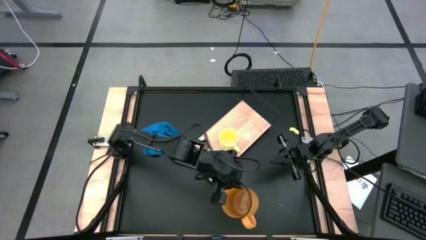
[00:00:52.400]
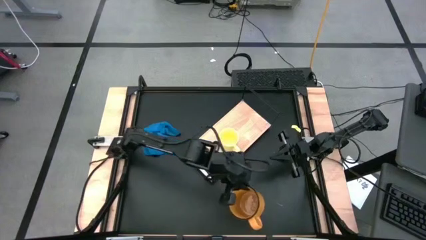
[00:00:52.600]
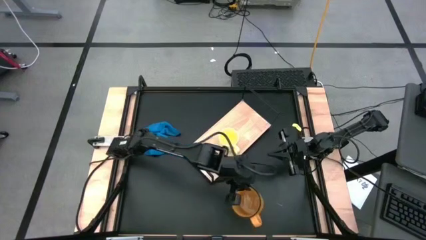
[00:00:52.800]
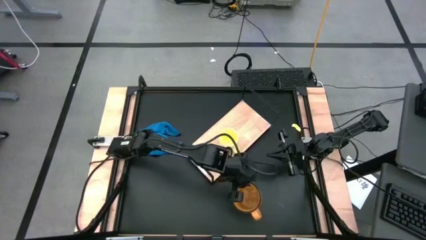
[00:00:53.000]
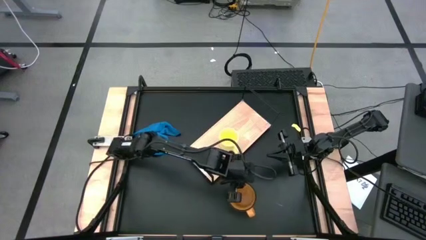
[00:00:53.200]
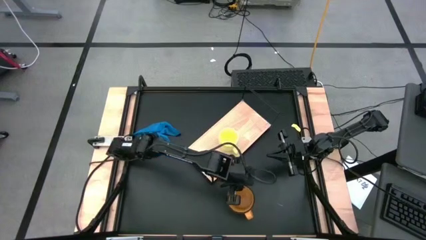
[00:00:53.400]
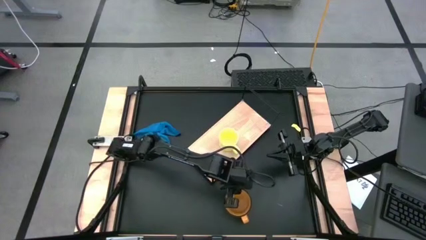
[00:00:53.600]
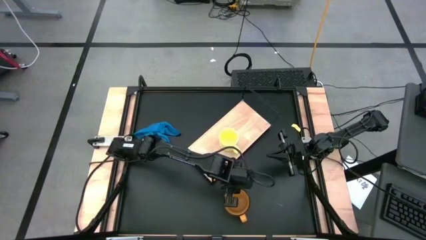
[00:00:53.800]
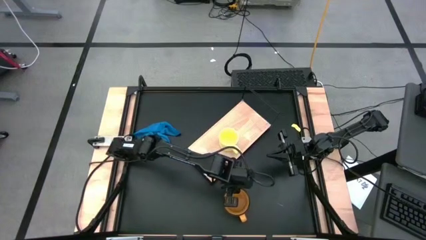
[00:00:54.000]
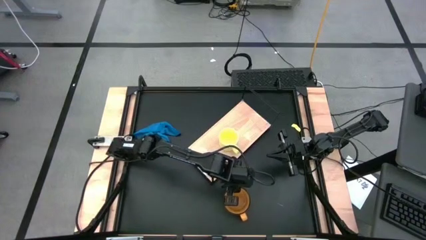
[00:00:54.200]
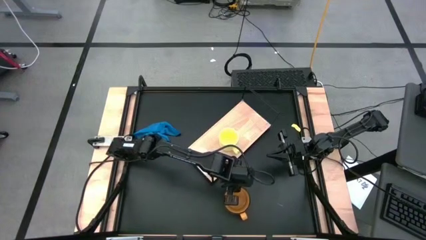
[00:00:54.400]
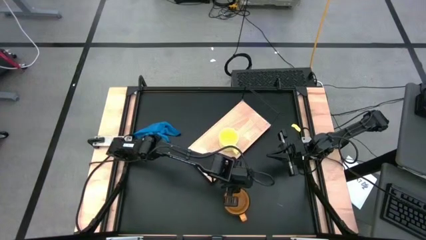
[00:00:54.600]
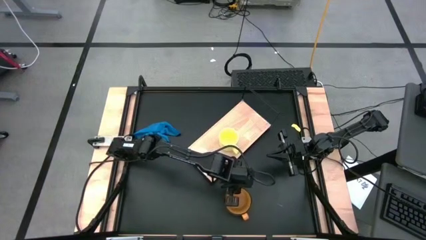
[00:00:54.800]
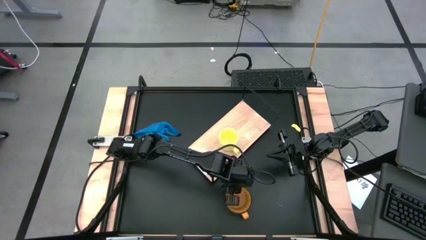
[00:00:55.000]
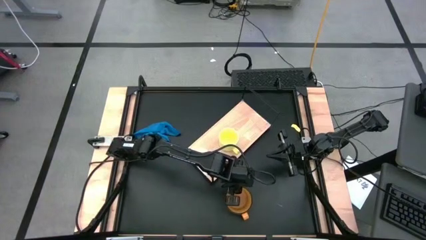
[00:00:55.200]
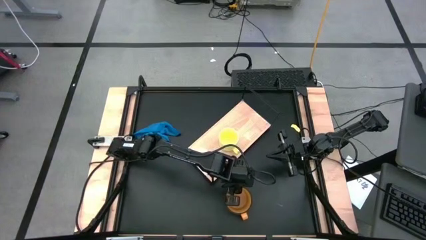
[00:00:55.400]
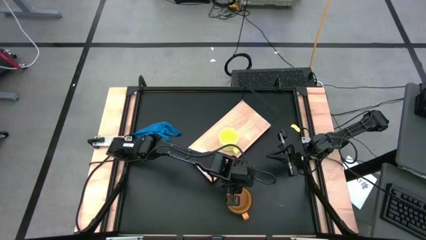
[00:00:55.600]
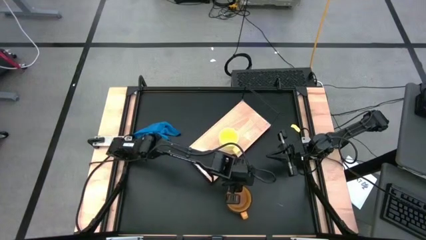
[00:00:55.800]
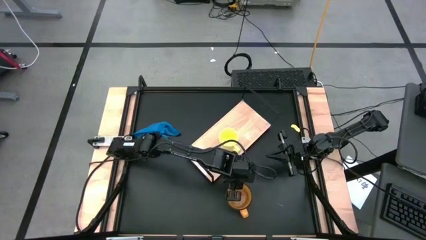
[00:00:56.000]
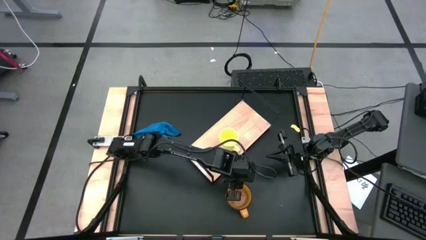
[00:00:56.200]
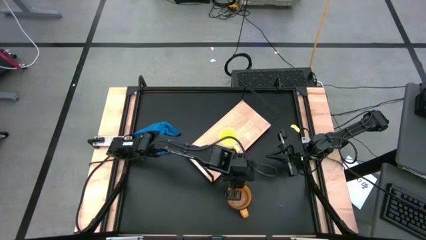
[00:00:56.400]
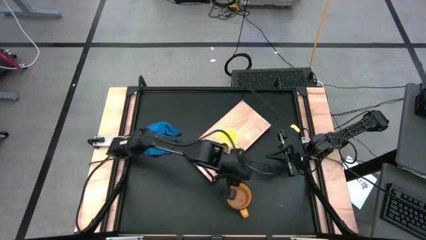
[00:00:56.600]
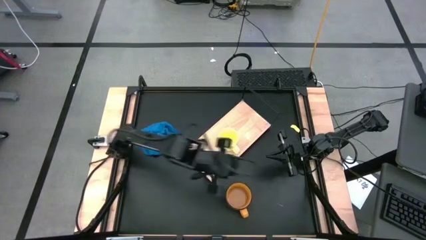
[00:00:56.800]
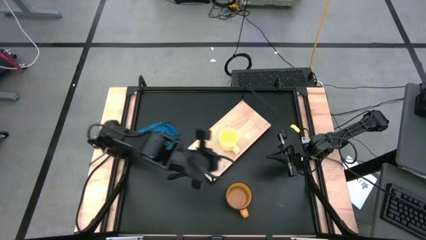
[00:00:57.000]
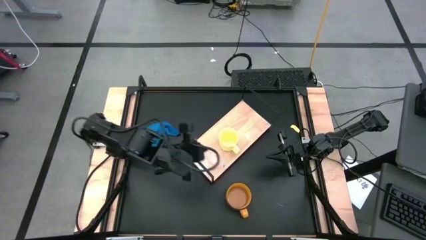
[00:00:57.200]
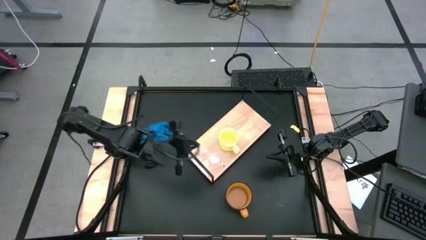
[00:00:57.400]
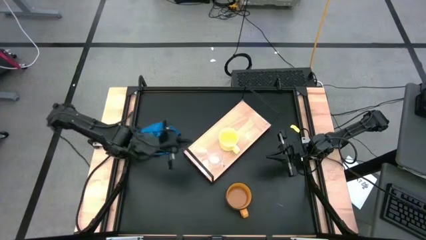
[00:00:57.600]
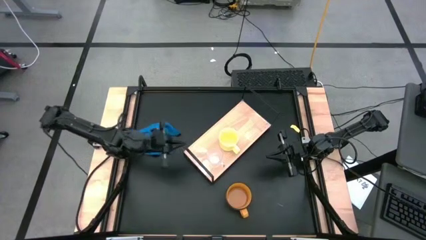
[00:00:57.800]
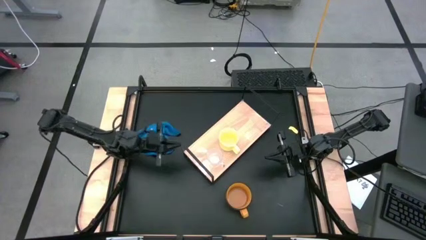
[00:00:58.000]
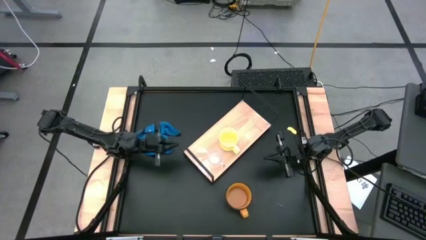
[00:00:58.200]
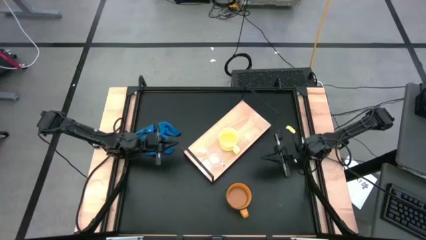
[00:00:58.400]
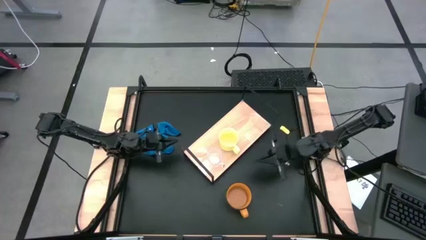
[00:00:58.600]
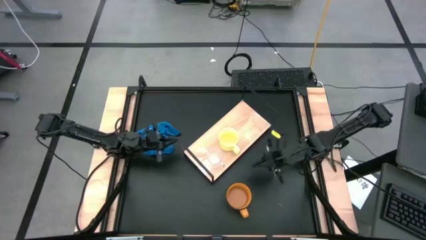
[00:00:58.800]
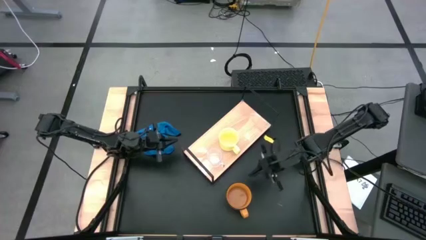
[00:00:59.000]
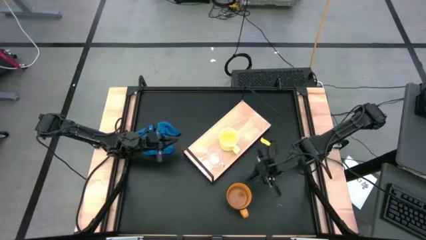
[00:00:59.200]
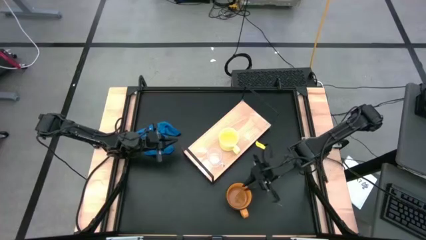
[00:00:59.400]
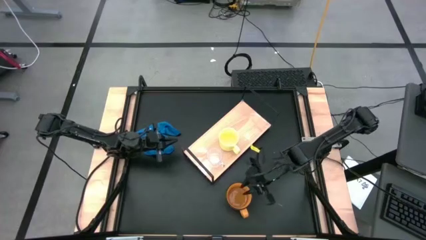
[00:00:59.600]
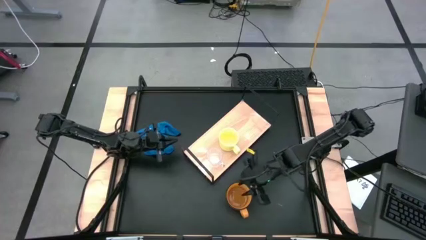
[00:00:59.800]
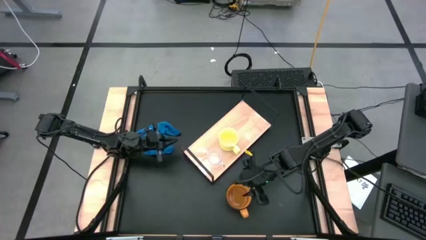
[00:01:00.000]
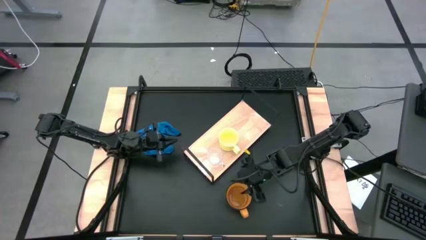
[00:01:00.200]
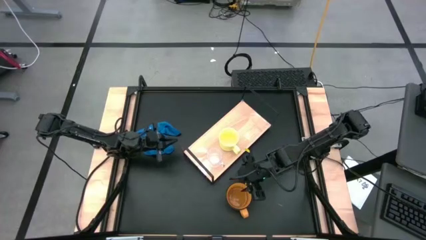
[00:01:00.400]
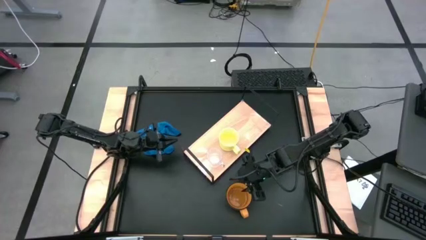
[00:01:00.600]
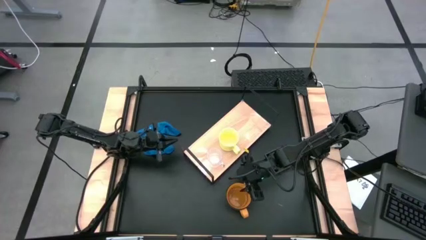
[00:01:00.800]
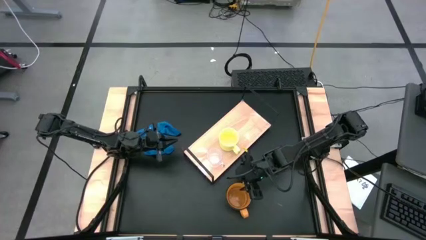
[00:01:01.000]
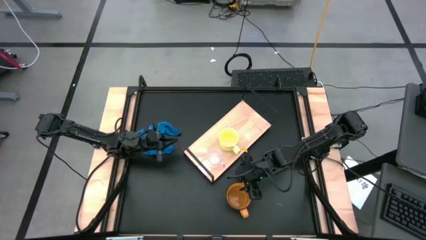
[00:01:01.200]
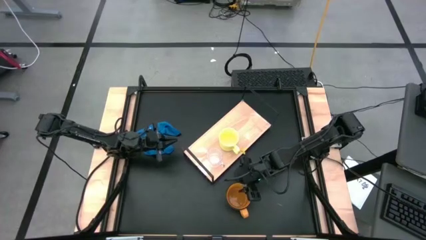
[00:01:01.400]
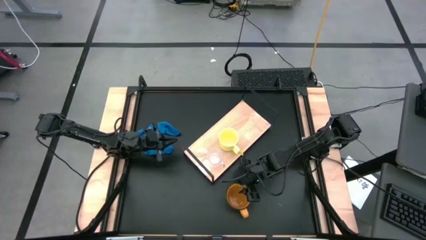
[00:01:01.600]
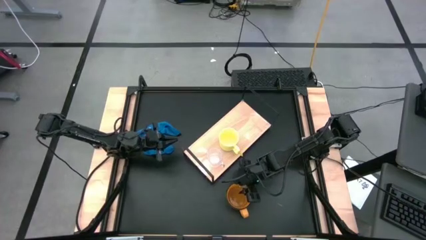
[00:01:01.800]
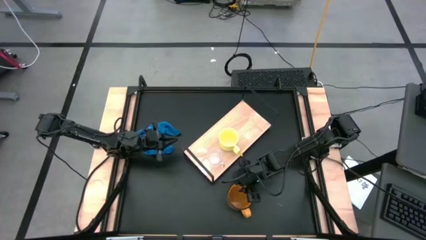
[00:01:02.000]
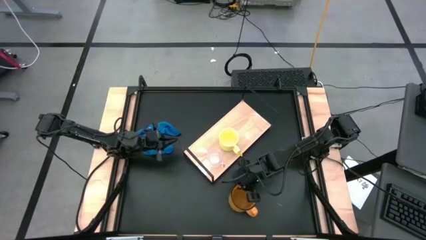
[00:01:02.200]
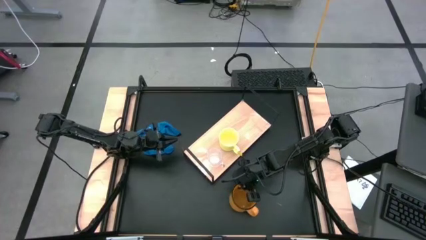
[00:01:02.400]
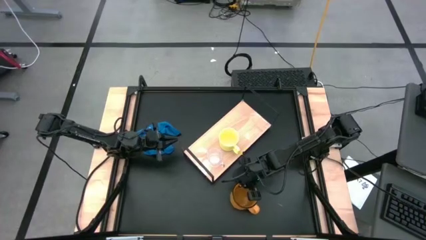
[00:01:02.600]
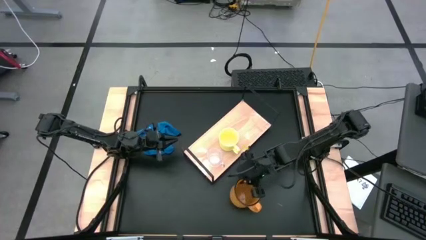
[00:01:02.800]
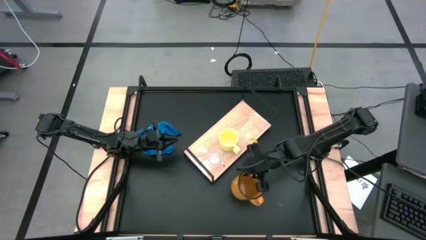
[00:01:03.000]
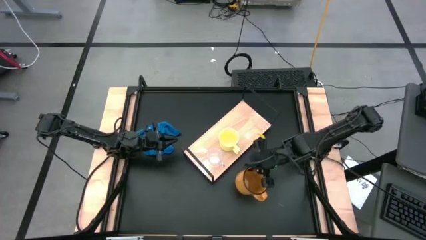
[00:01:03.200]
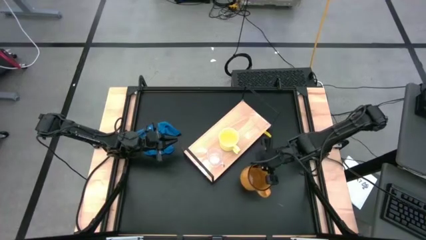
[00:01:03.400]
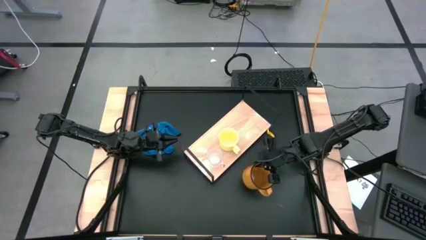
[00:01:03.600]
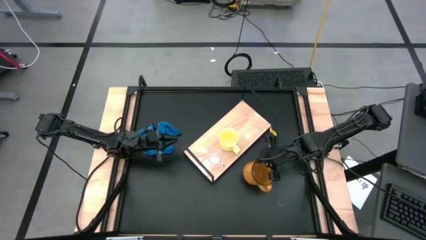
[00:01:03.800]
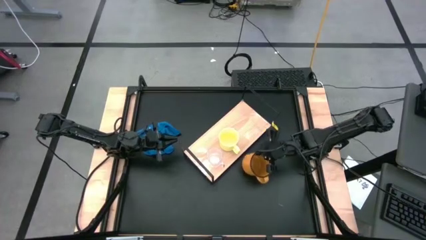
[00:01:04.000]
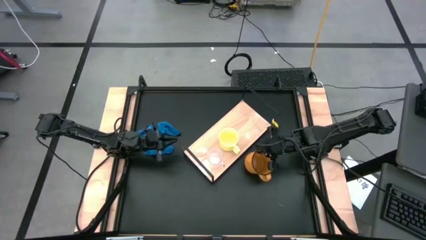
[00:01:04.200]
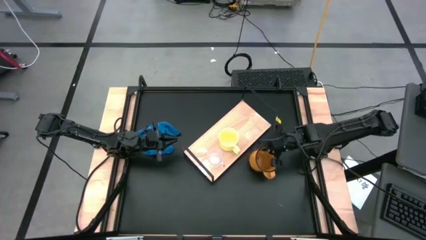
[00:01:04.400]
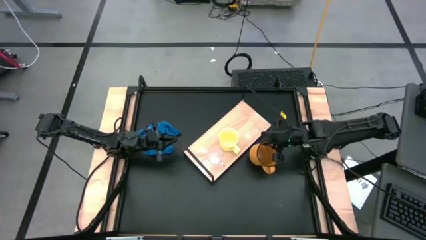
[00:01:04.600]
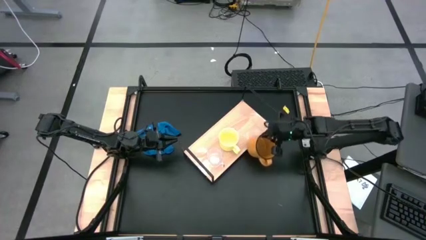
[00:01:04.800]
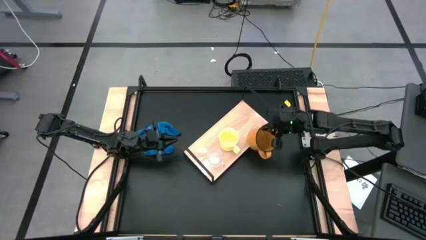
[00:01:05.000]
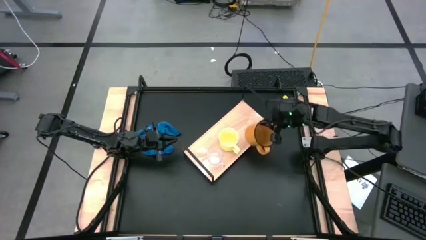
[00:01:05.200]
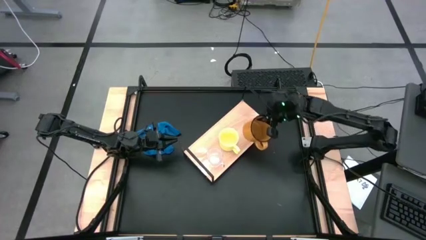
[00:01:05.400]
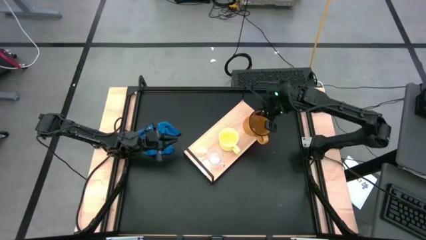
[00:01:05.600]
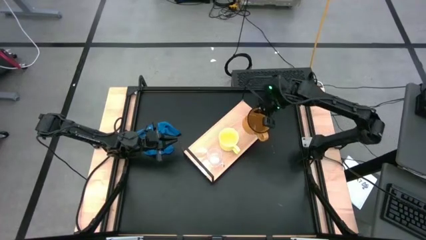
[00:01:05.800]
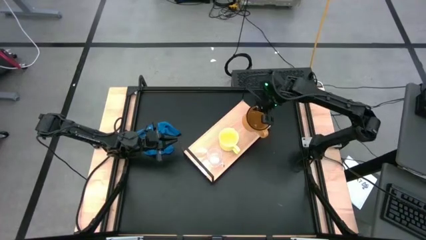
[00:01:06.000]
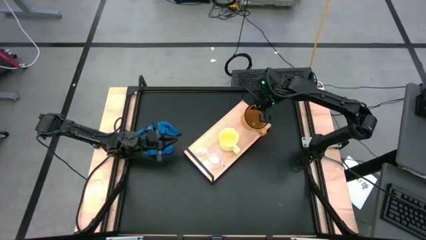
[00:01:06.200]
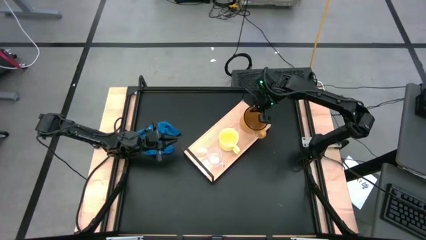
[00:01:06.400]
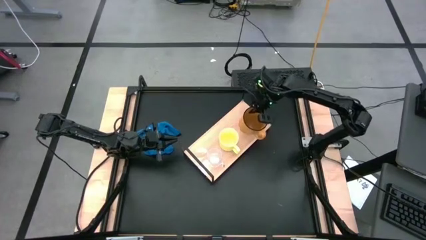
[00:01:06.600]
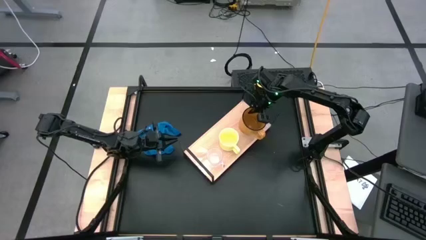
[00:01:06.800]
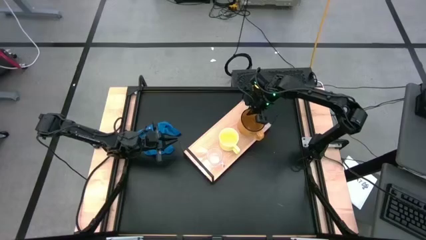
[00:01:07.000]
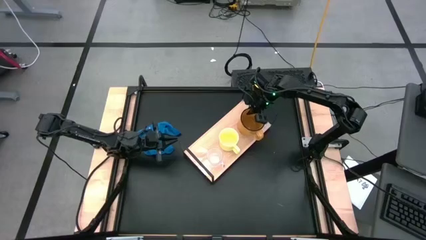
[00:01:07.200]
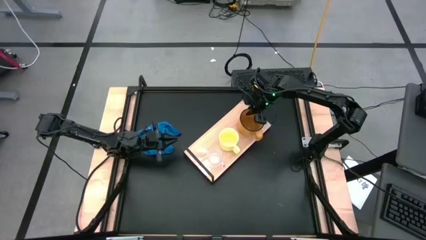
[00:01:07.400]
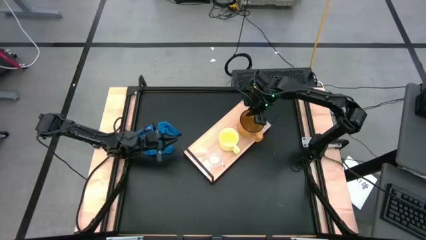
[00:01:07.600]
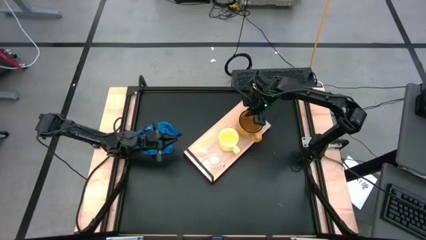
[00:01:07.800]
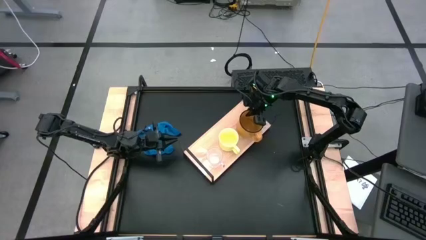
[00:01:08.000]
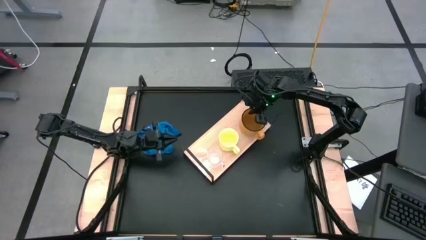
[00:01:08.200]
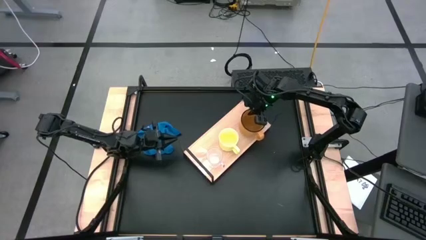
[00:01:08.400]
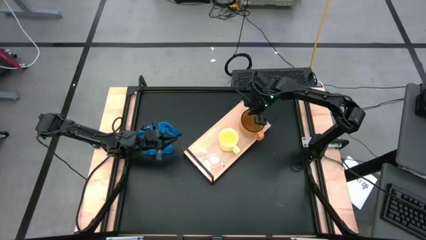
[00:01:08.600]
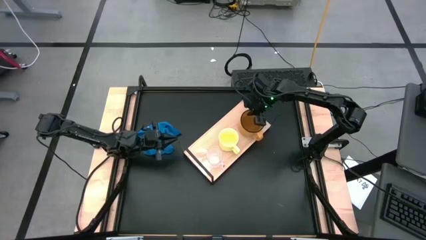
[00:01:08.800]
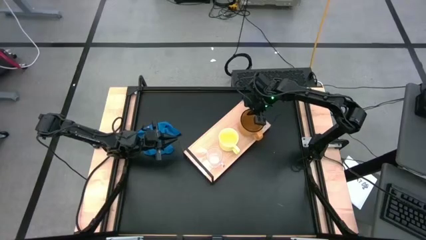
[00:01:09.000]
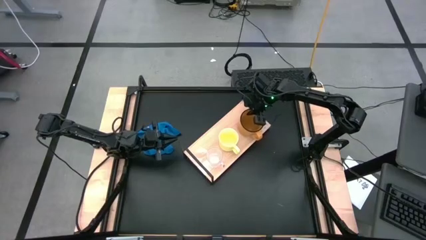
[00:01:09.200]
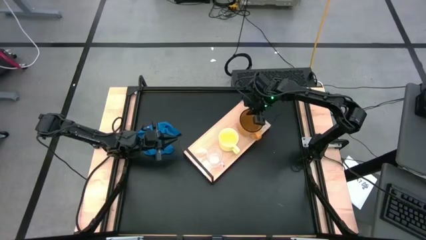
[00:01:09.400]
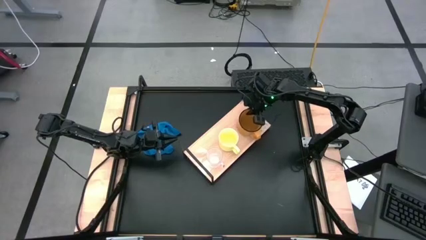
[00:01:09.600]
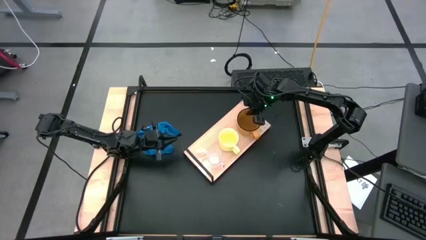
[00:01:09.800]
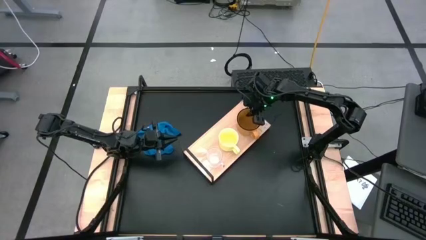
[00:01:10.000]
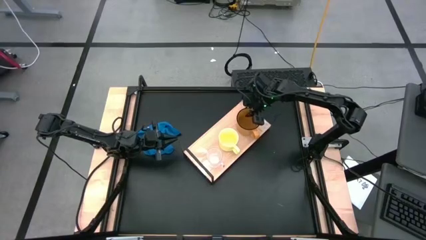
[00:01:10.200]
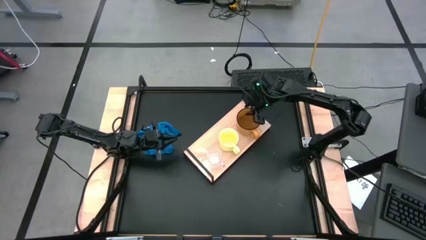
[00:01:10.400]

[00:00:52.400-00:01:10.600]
Task: Stack small to large cups/mugs on shelf
Put the orange mug on the shelf
